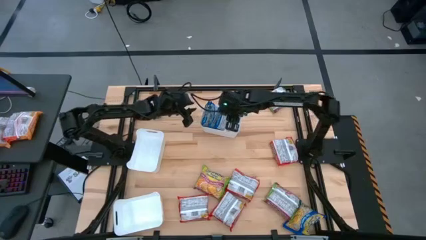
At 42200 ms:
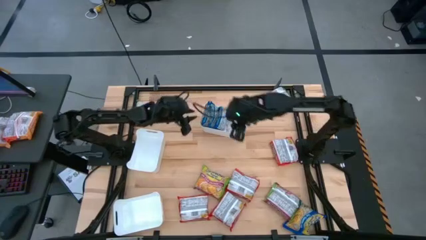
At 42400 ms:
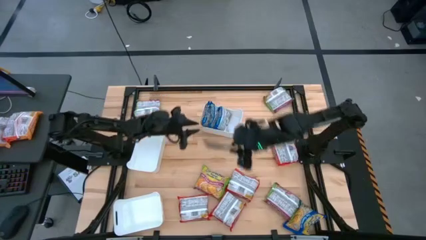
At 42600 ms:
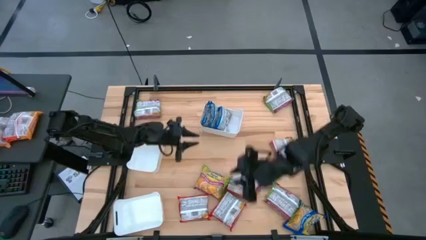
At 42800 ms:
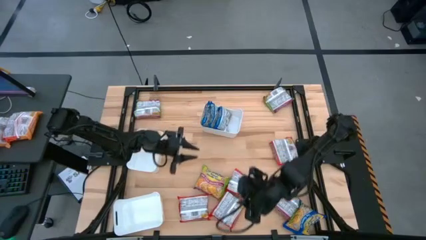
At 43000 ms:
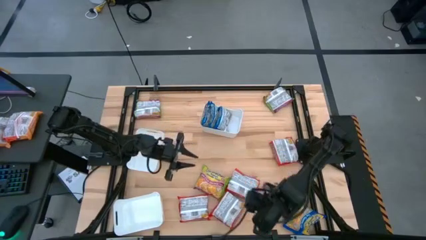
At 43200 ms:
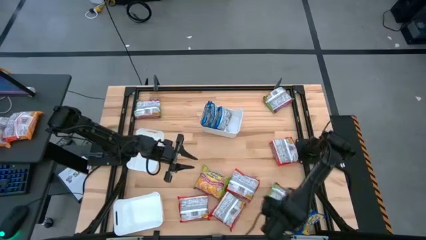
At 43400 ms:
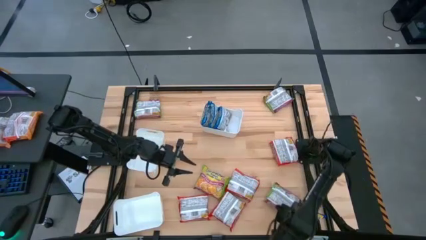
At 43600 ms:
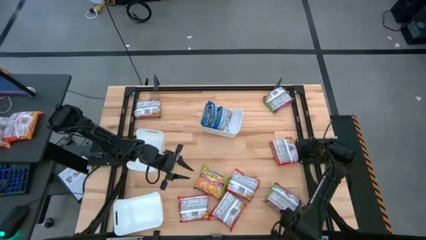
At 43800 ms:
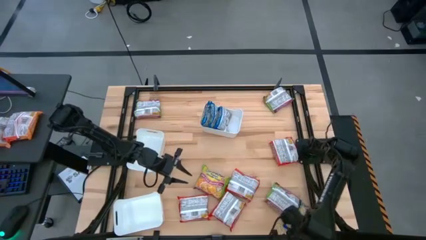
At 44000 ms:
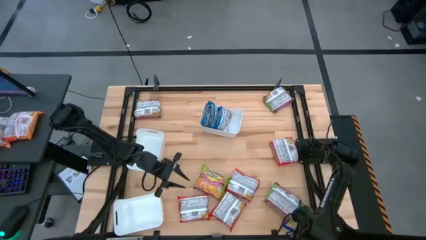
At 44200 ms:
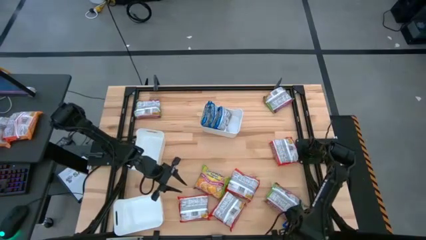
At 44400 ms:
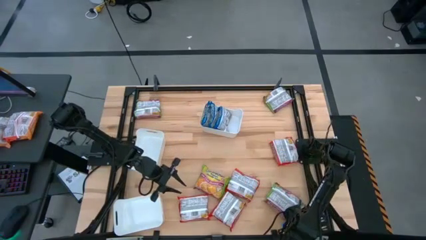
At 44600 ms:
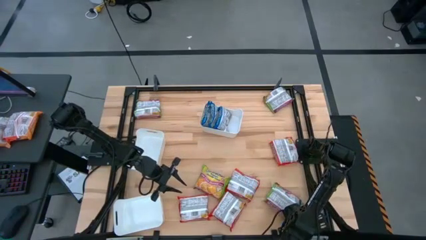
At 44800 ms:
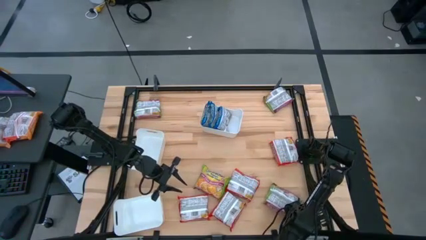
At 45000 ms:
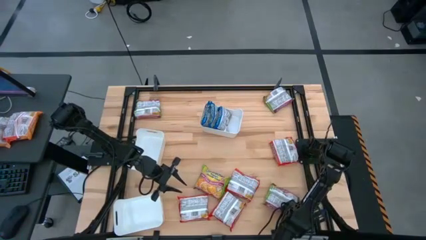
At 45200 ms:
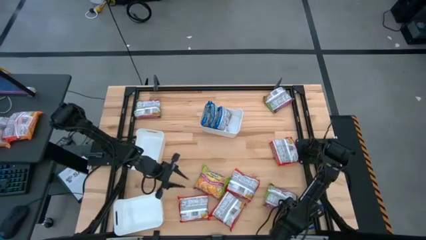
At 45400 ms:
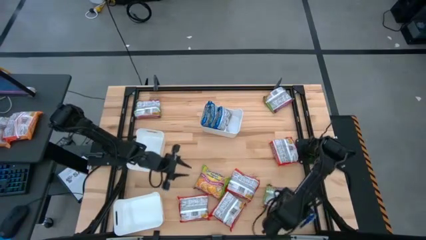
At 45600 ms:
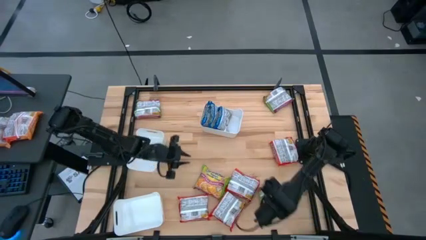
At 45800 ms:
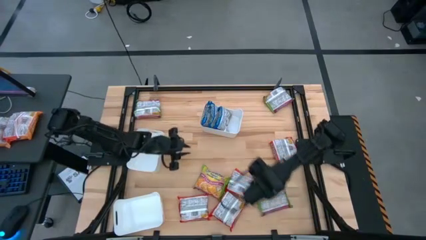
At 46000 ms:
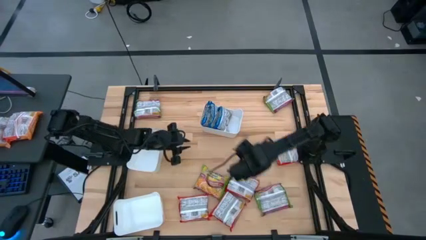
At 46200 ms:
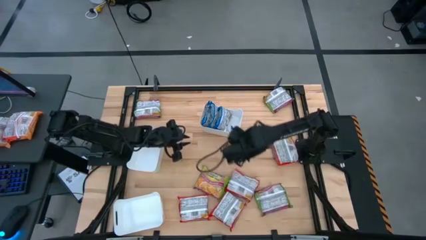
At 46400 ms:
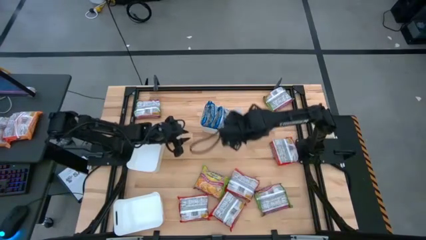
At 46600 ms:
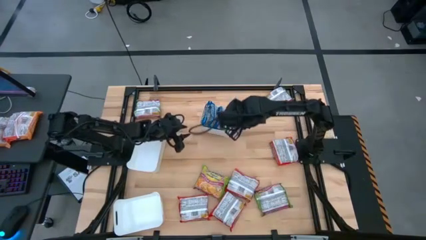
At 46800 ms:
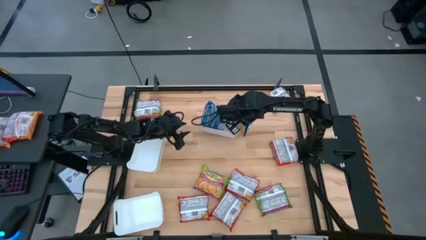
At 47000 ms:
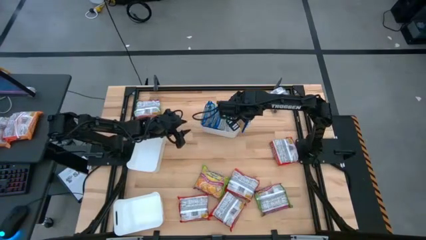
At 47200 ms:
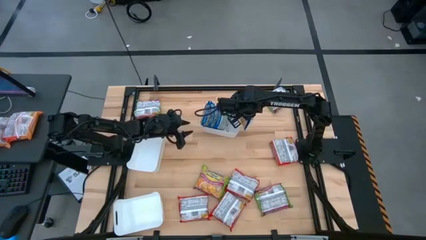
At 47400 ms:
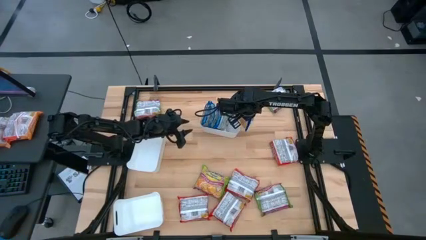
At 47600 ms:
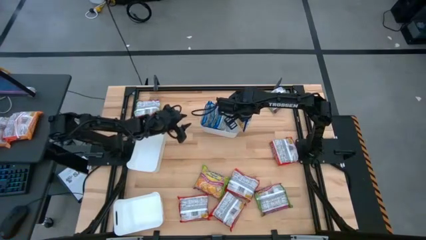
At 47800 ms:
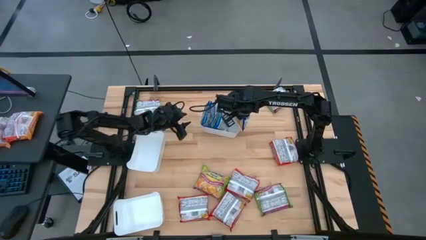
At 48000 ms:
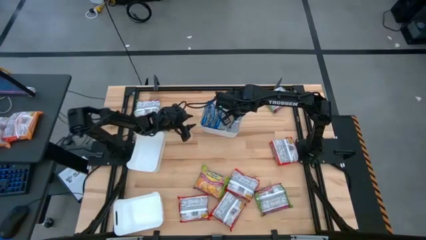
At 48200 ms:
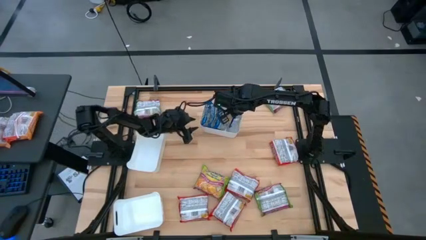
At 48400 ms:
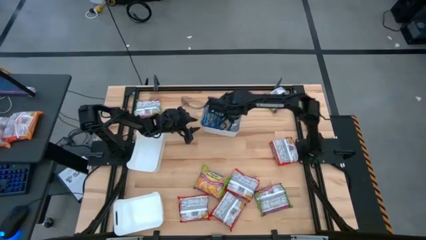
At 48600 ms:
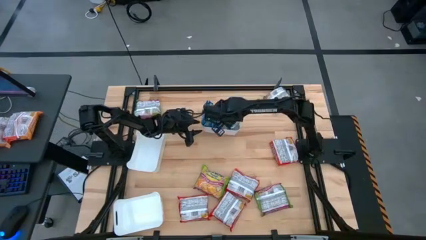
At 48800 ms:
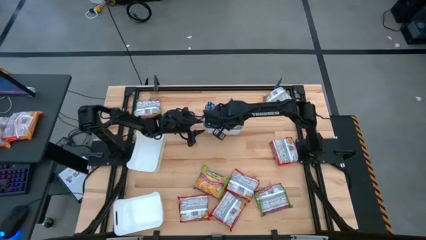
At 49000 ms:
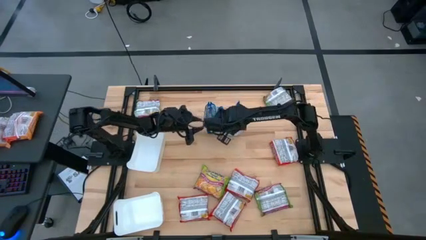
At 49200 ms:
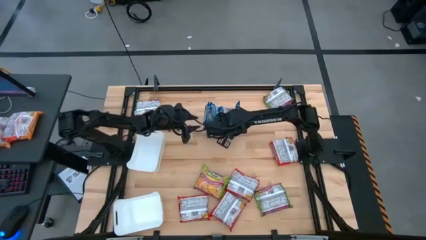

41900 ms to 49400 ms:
Task: Sort Maruchan noodles
Put the blue noodle pack into the top white bin

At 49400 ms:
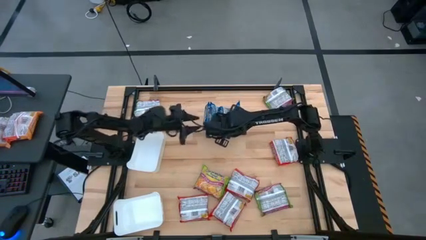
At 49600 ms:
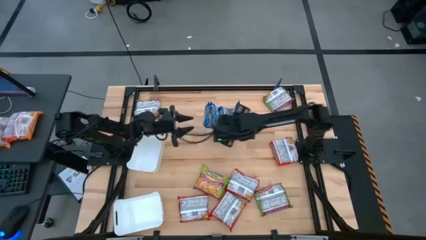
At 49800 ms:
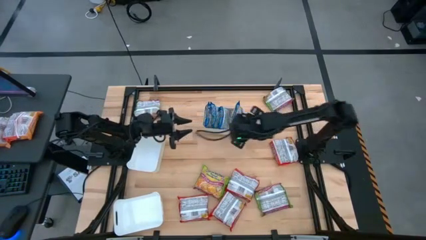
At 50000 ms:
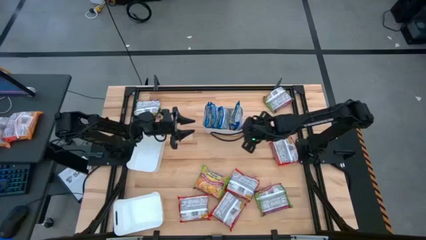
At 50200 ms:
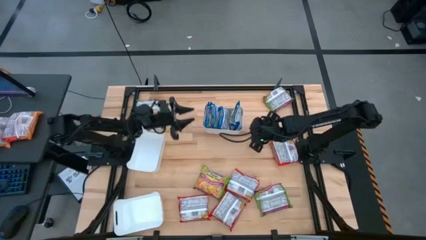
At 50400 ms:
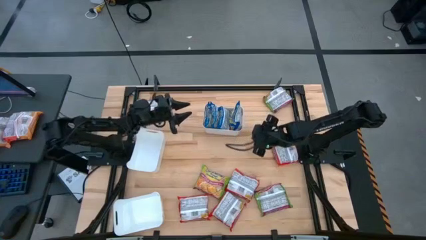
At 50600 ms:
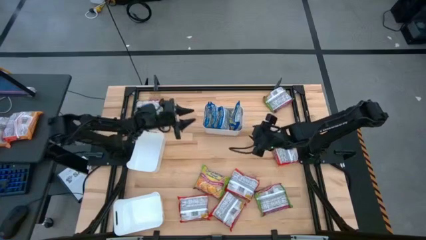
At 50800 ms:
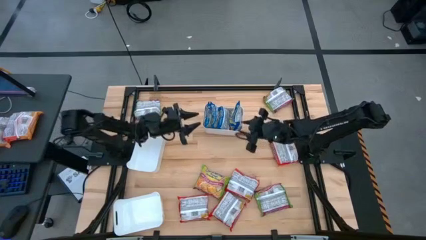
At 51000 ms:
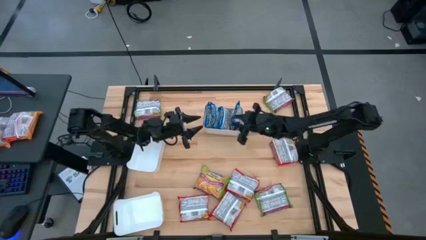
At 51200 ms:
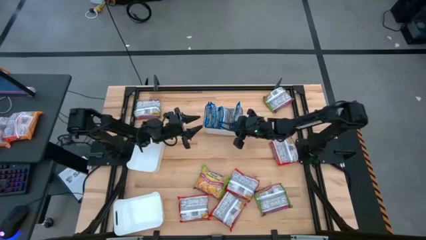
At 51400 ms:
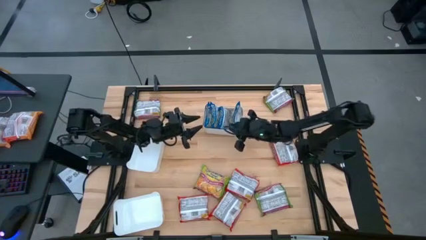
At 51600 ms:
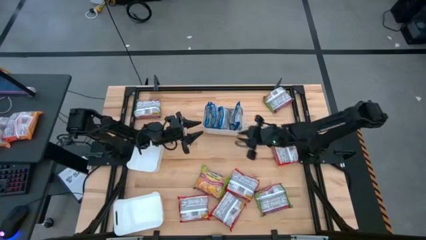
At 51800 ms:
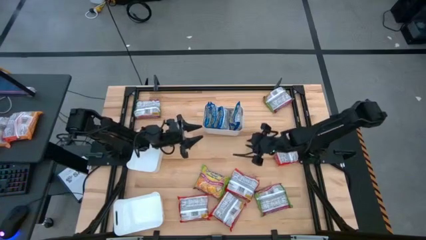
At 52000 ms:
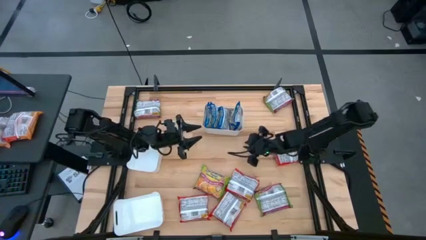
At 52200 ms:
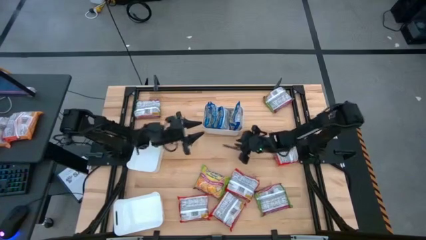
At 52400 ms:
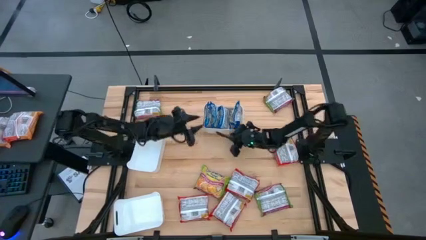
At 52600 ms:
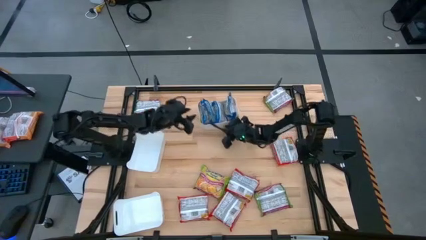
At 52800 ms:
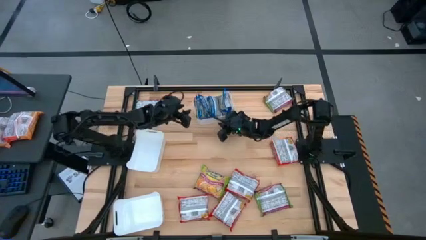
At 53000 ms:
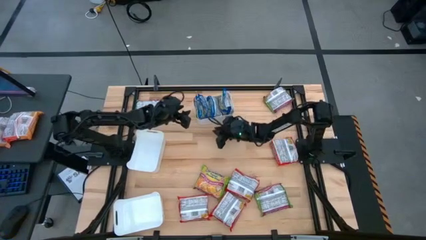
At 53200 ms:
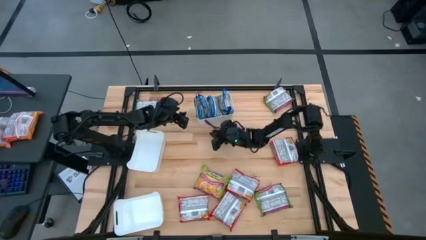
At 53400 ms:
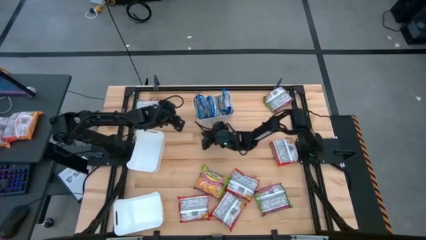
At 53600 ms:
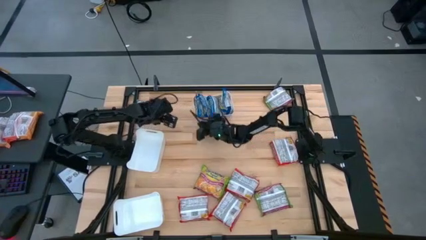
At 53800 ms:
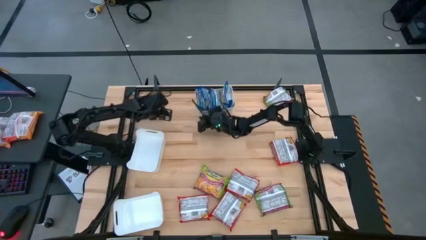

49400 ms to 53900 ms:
Adjust the top white bin

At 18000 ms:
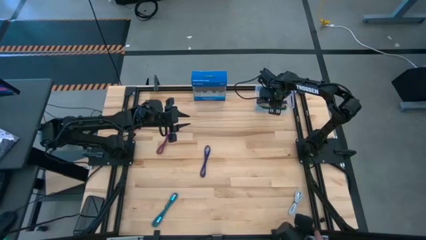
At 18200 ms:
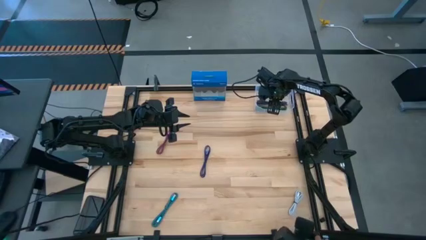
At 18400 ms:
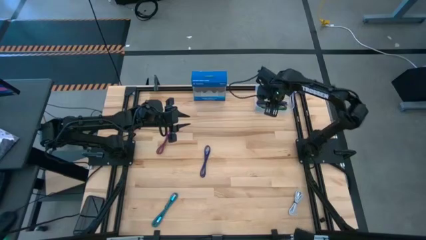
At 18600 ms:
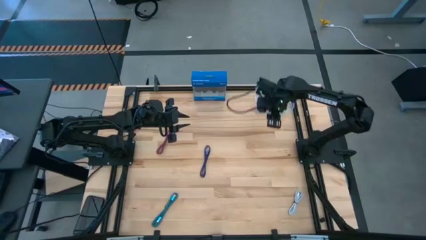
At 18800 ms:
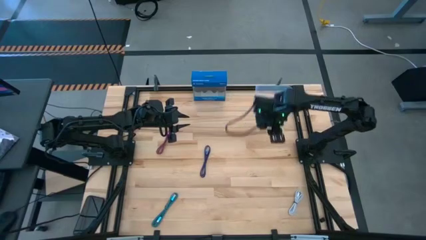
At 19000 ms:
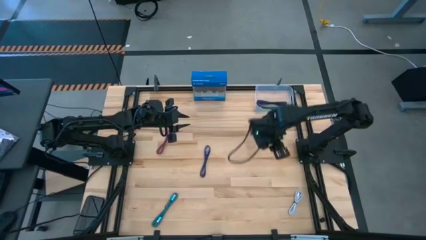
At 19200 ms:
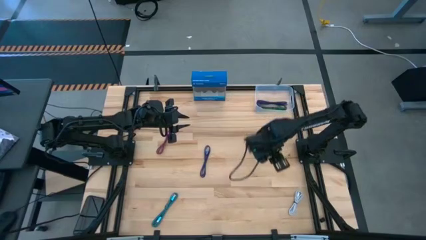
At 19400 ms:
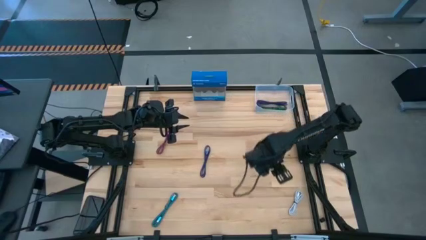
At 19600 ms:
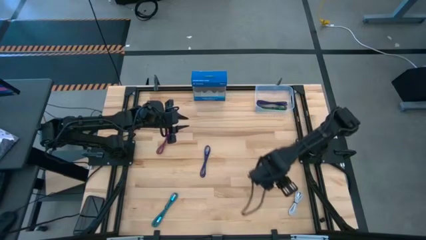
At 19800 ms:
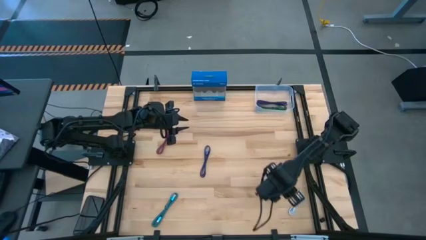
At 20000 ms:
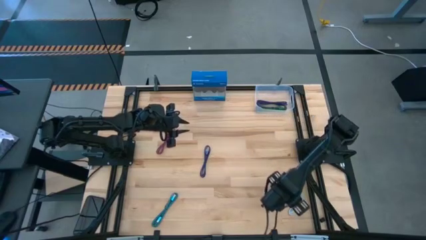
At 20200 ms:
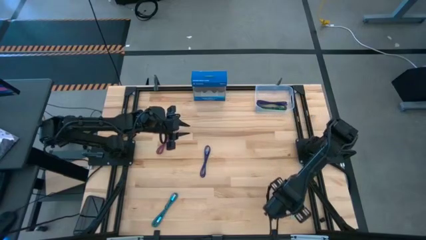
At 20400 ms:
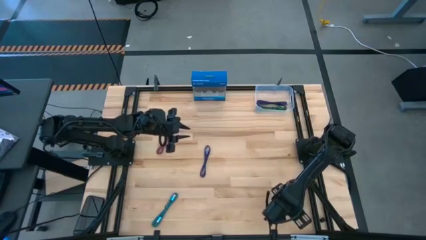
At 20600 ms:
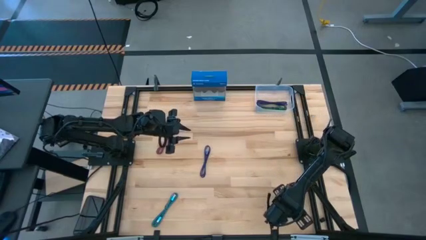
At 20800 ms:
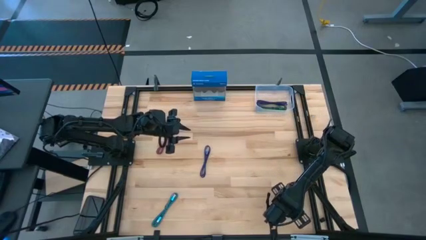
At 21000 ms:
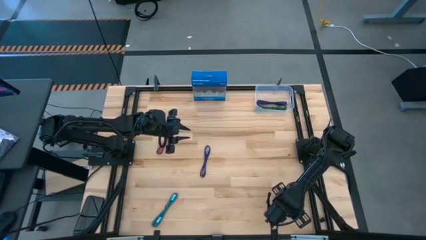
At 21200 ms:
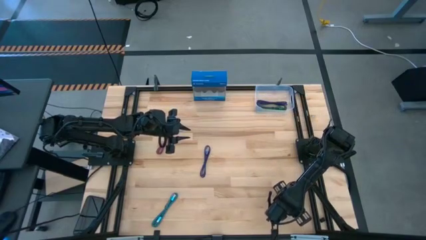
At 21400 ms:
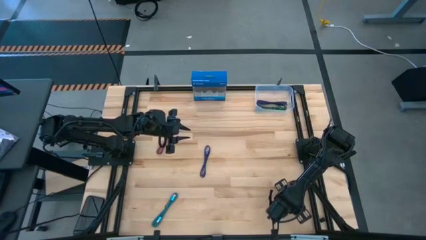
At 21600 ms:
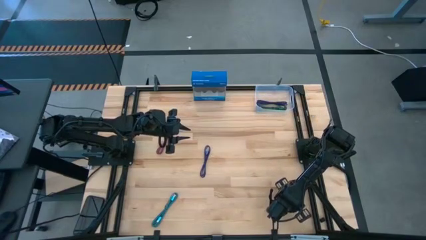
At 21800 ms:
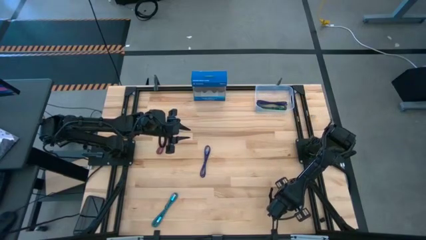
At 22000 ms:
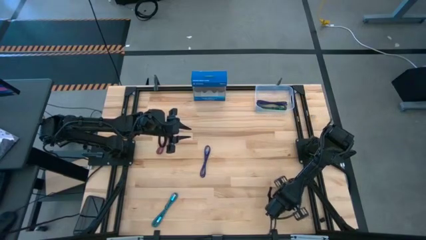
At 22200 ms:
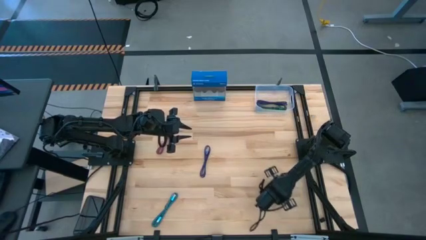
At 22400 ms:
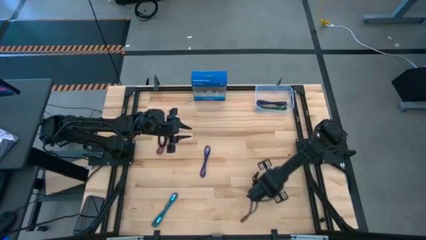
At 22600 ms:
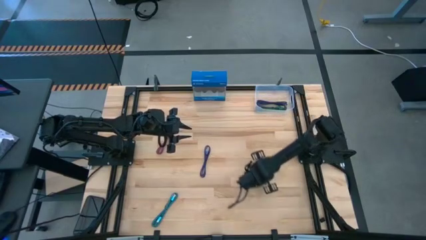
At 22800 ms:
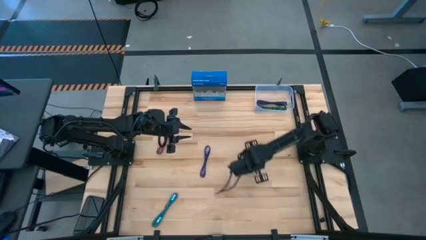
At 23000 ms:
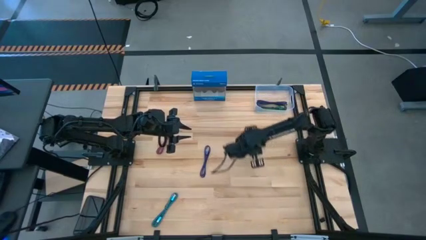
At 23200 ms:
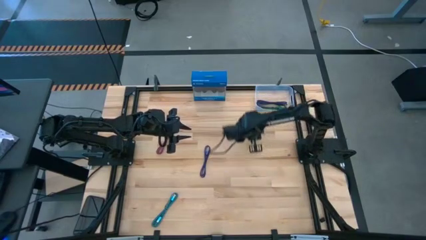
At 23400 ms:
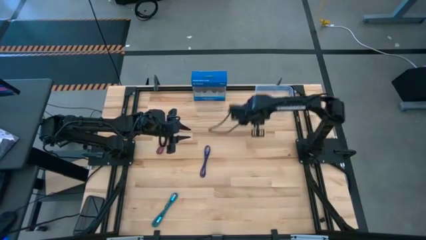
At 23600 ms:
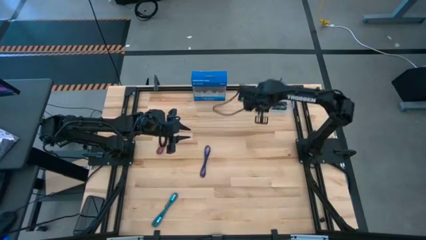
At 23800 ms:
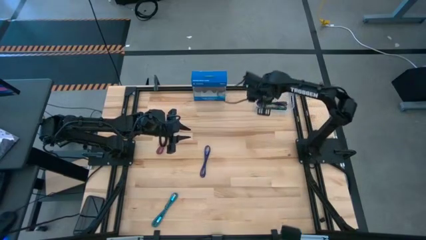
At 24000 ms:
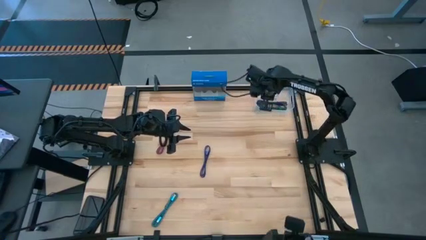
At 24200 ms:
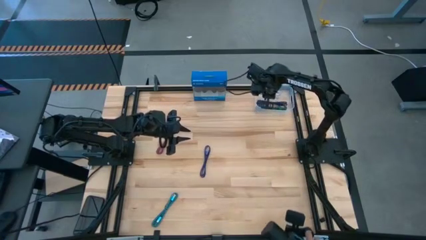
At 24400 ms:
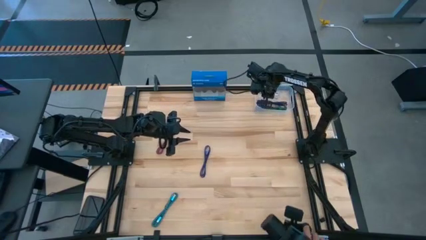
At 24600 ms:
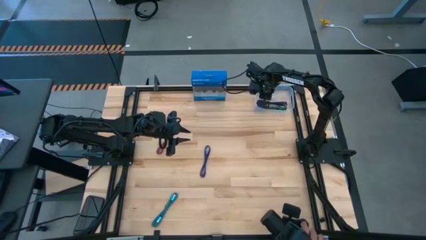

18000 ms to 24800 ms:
Task: Pick and place USB-C Cables
Put the white charger cable into the bin
